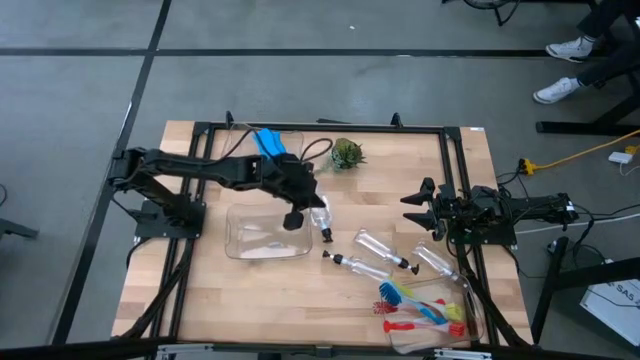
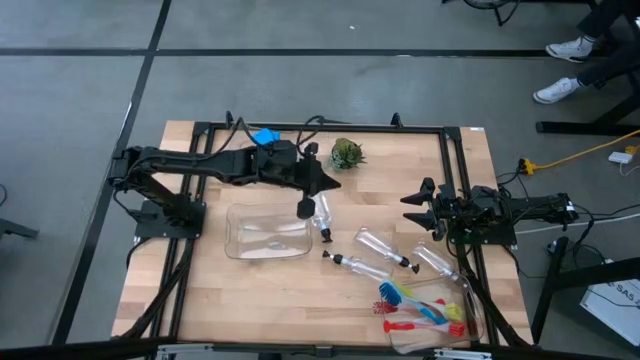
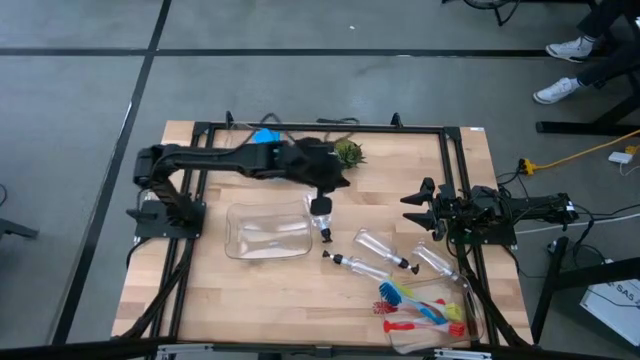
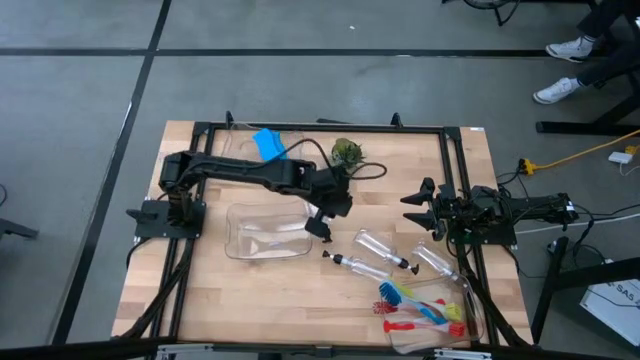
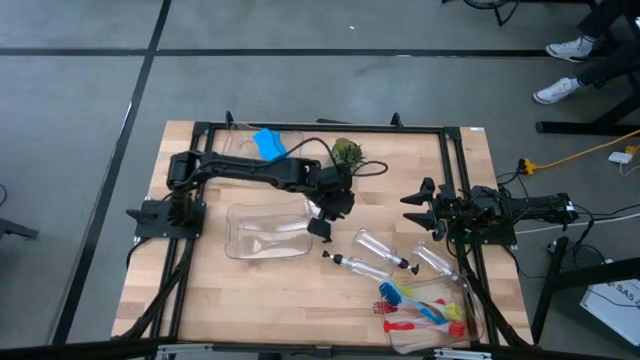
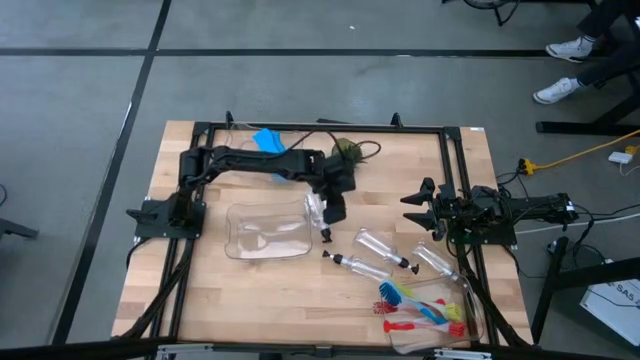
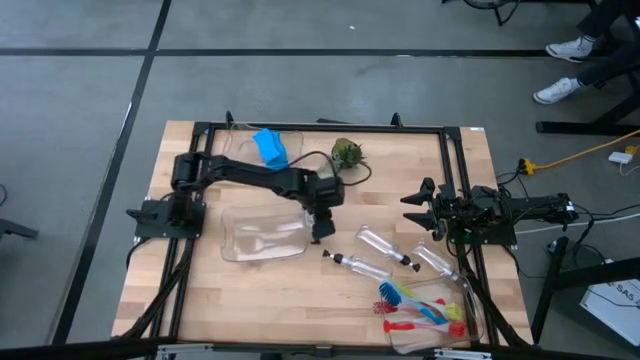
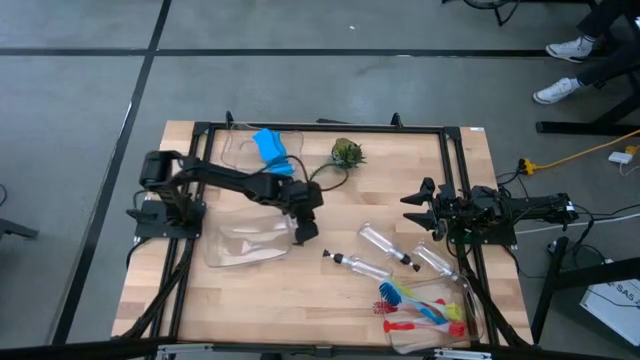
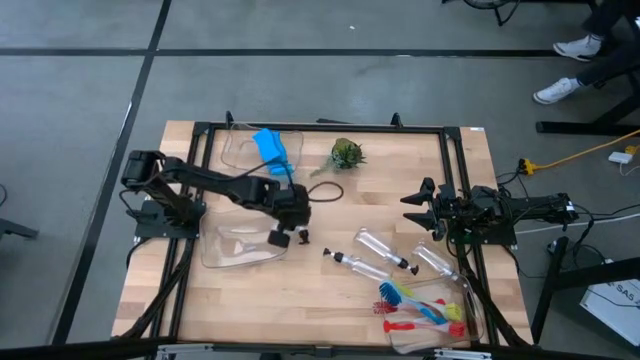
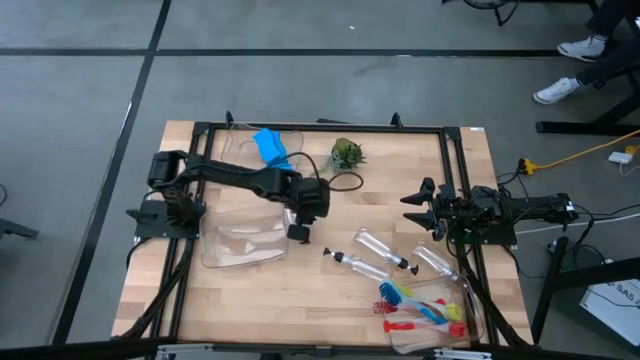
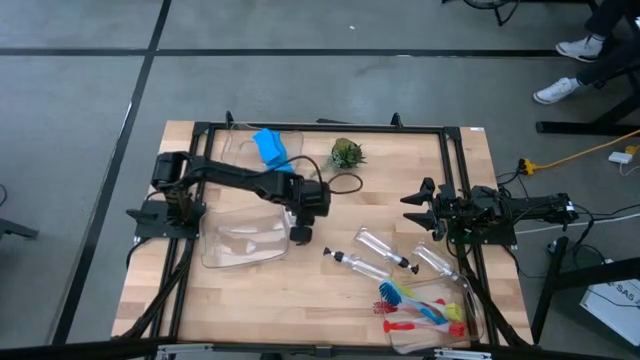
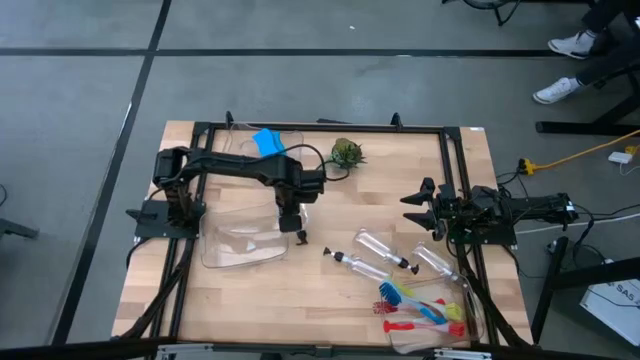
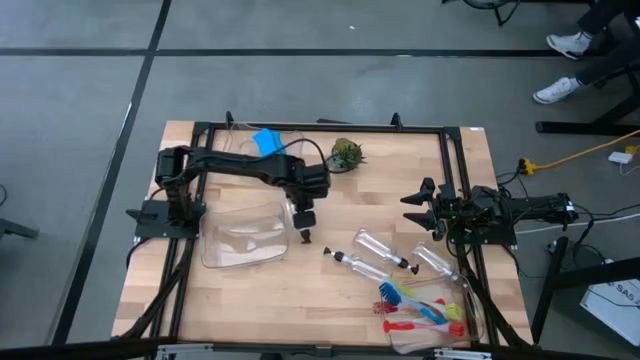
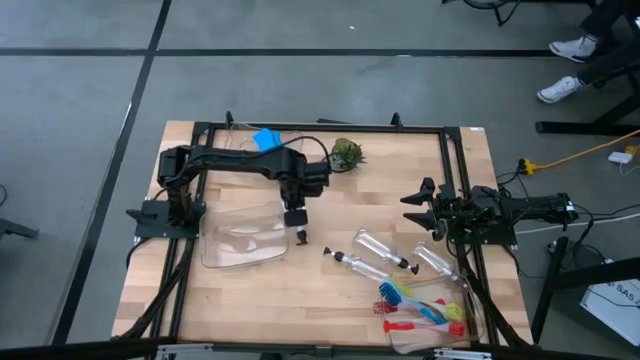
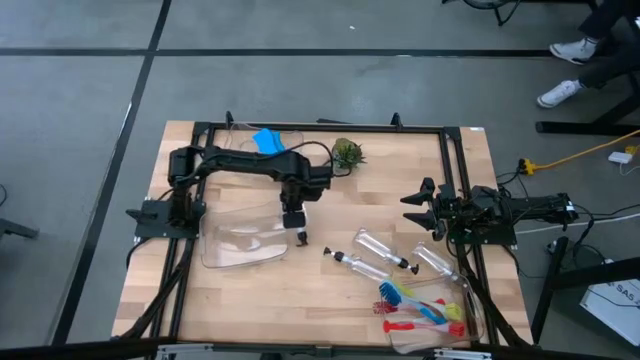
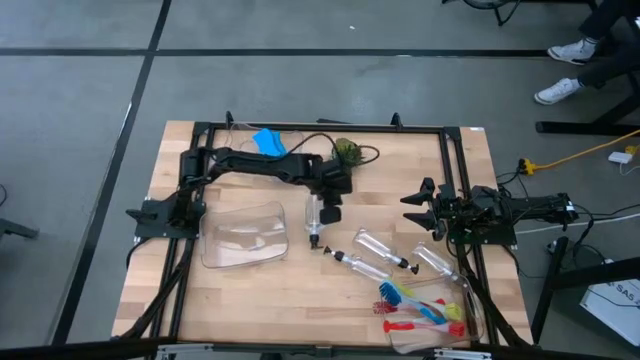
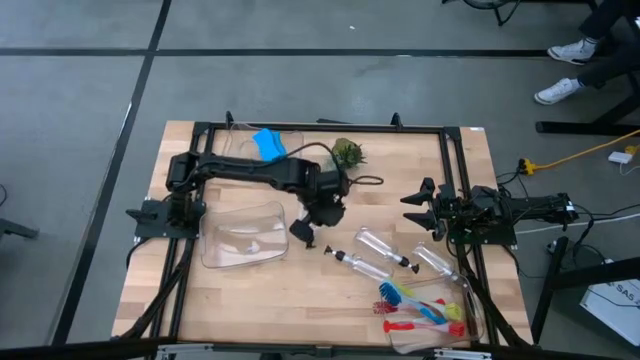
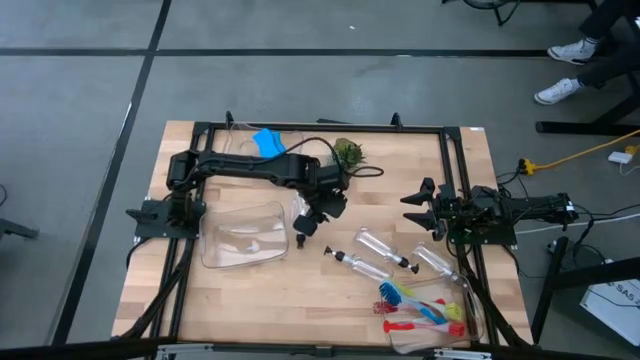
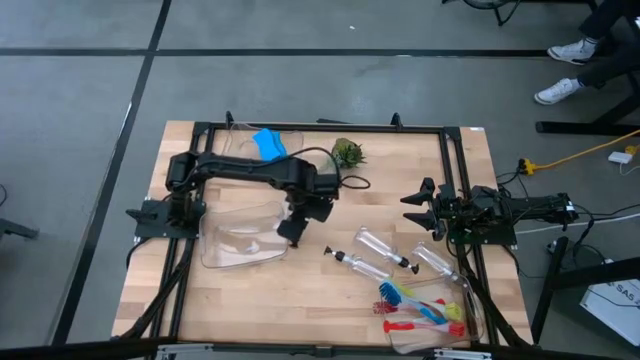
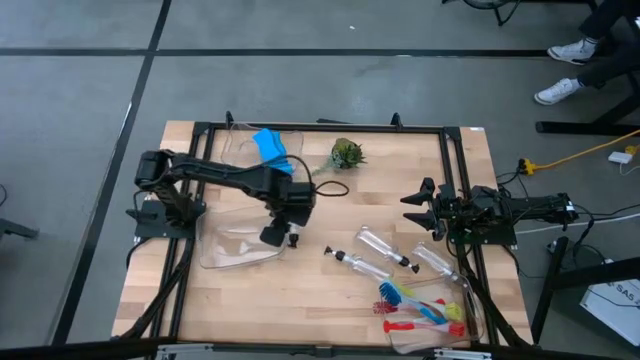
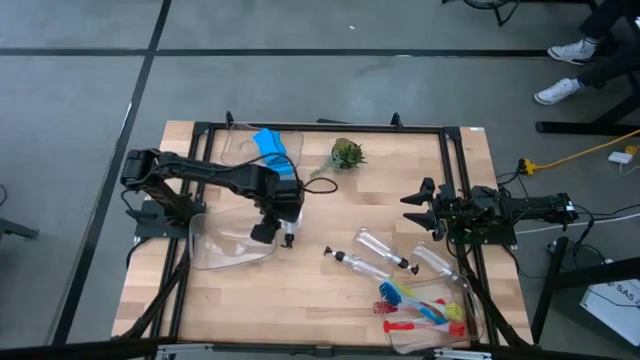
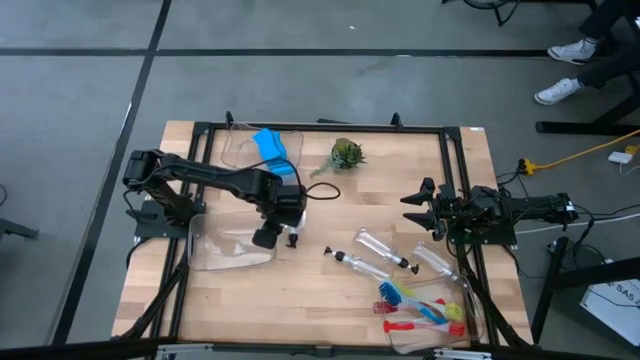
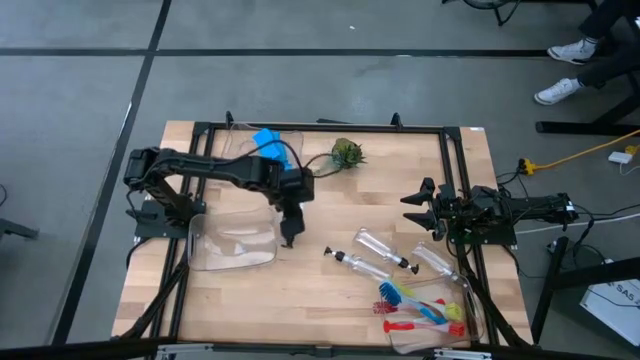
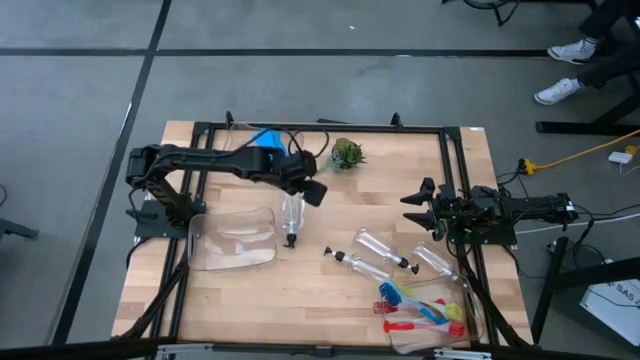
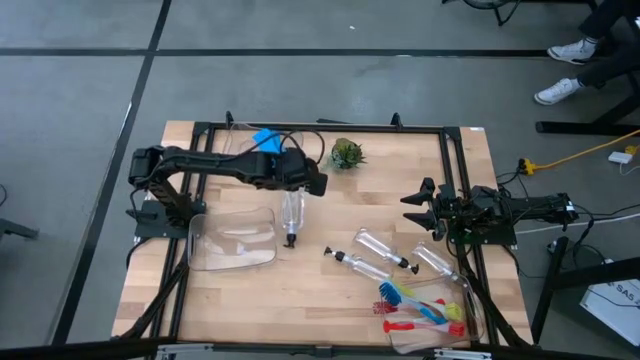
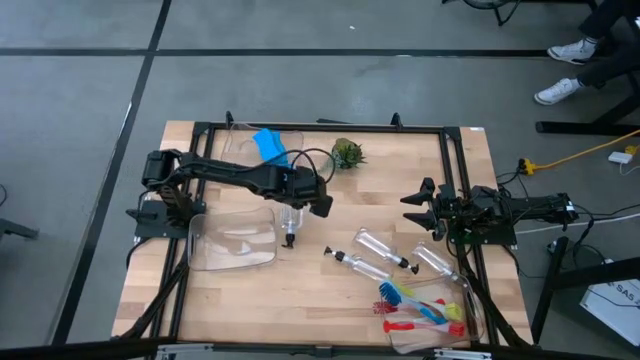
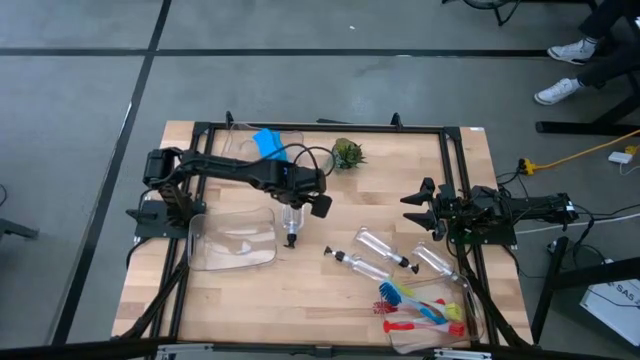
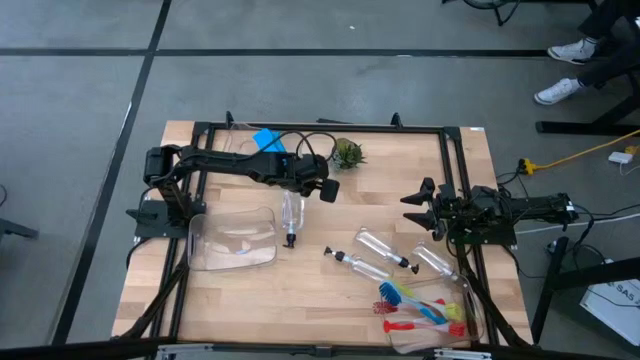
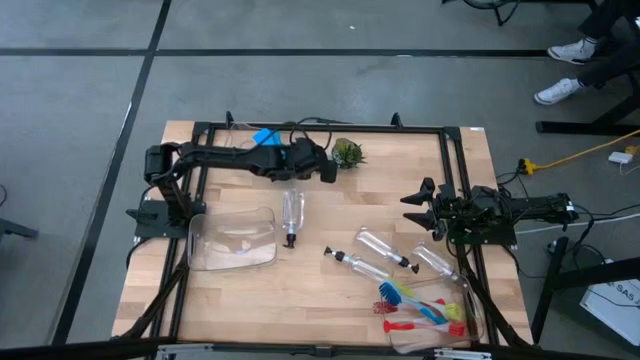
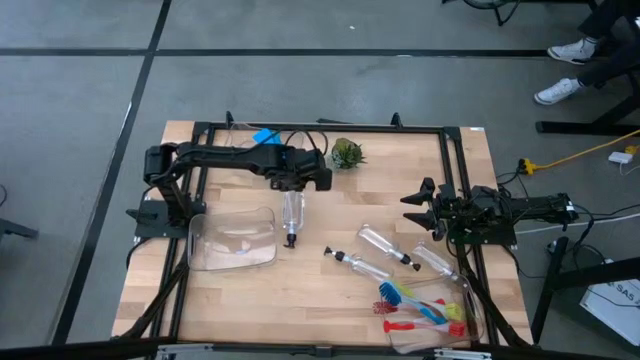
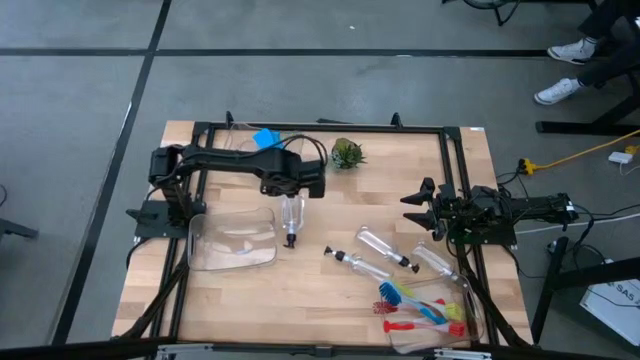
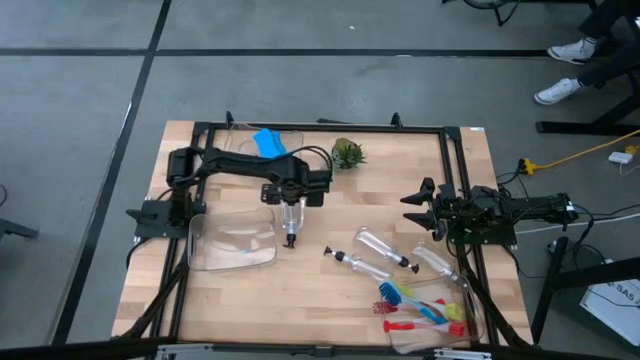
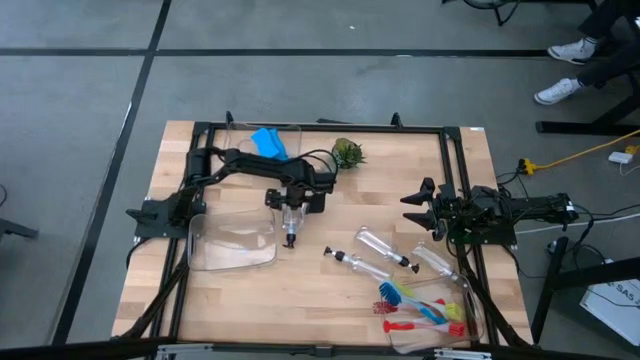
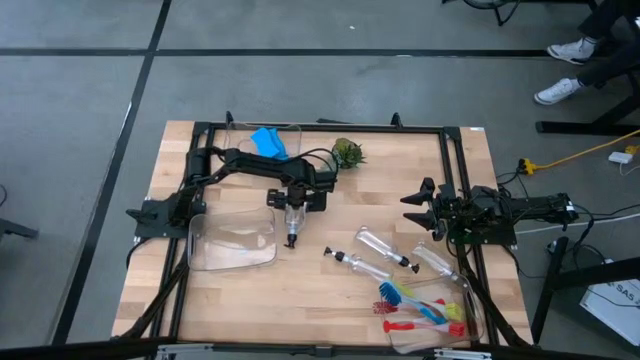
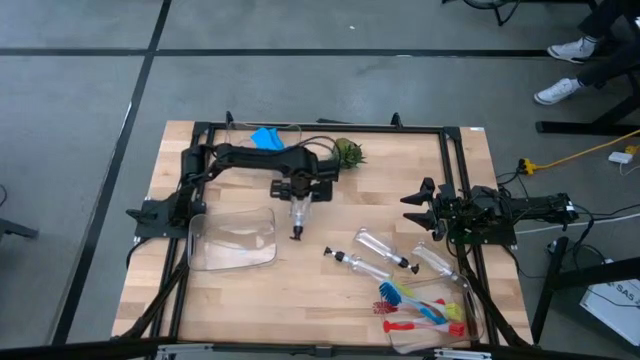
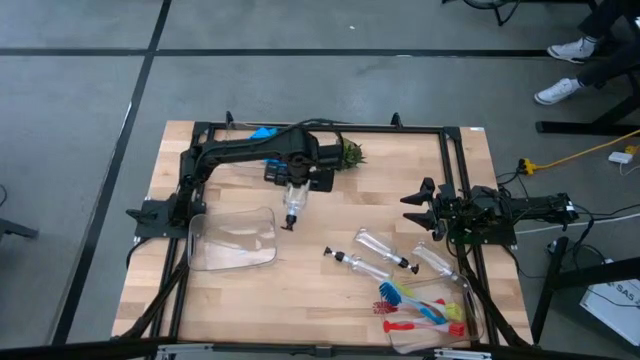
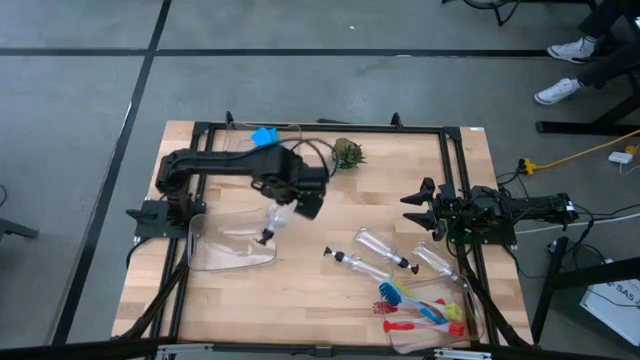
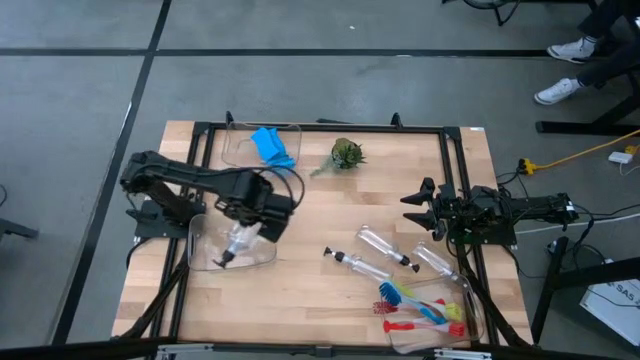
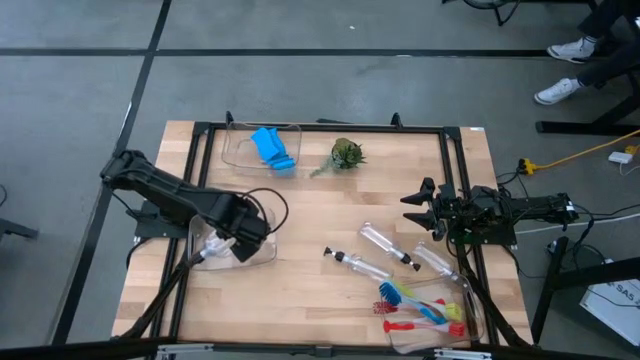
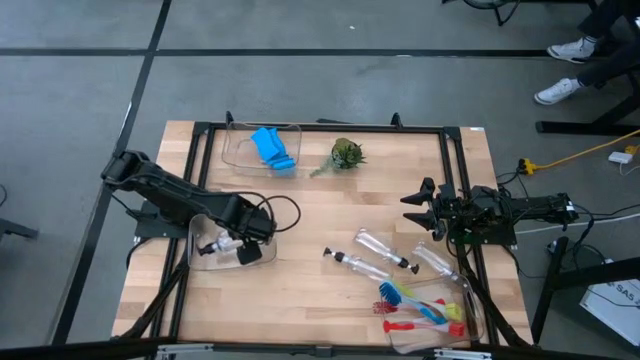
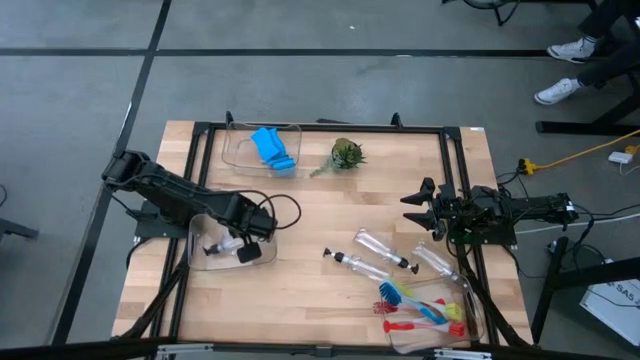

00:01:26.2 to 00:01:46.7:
Task: Pick & Place Kitchen Sink Supplies
Put the transparent soap dispenser into the middle transparent bin
